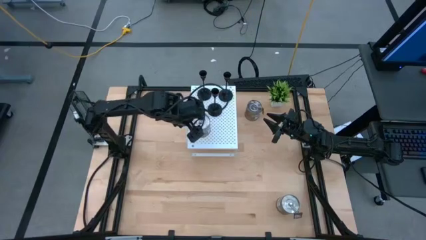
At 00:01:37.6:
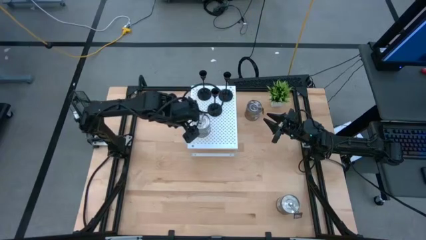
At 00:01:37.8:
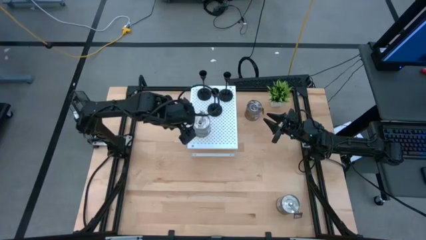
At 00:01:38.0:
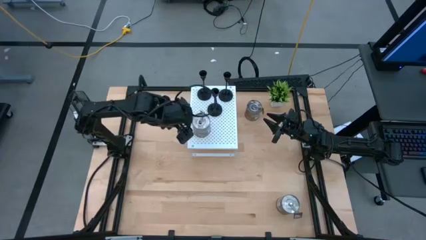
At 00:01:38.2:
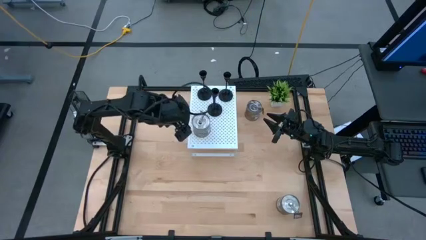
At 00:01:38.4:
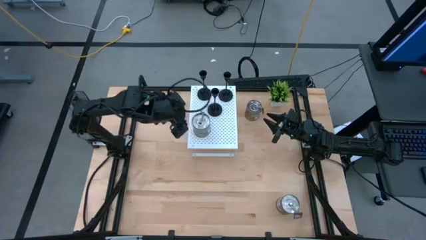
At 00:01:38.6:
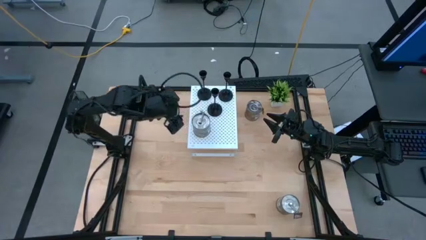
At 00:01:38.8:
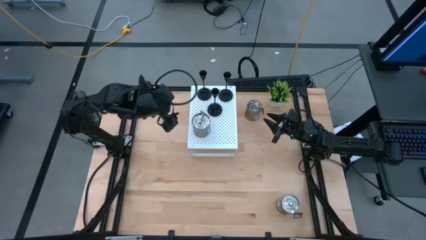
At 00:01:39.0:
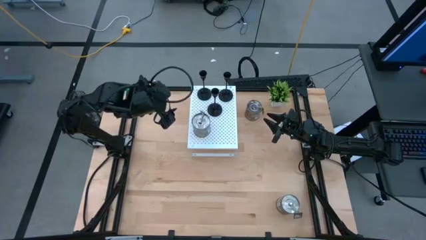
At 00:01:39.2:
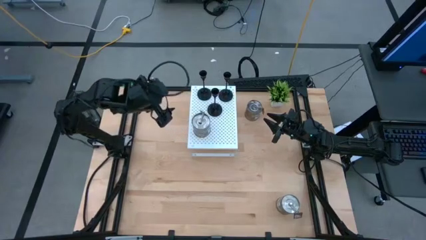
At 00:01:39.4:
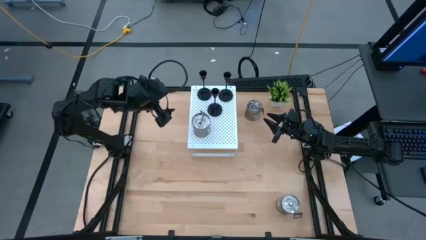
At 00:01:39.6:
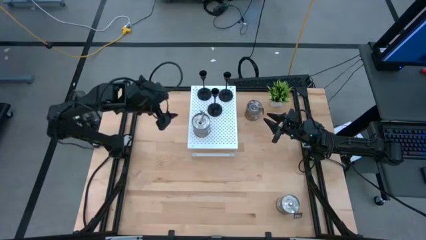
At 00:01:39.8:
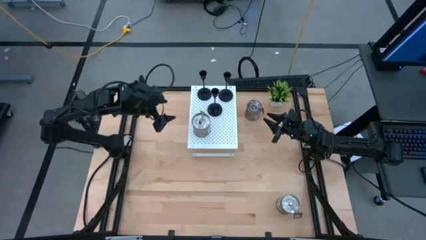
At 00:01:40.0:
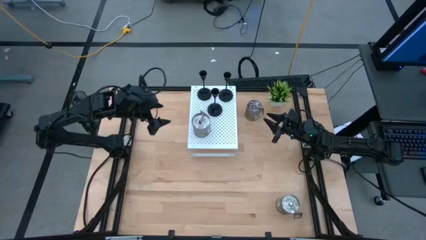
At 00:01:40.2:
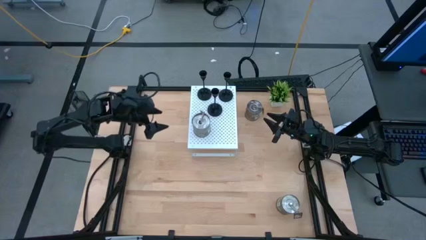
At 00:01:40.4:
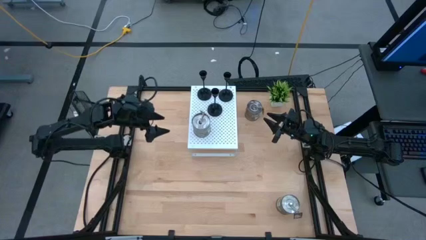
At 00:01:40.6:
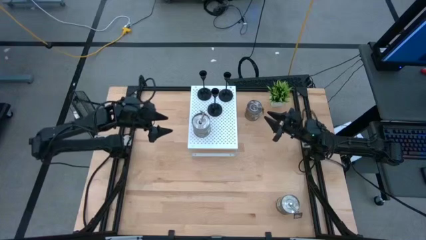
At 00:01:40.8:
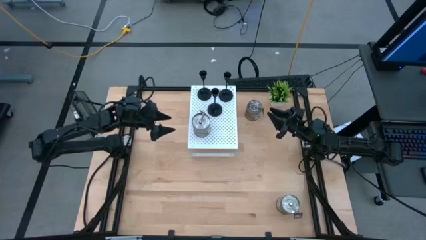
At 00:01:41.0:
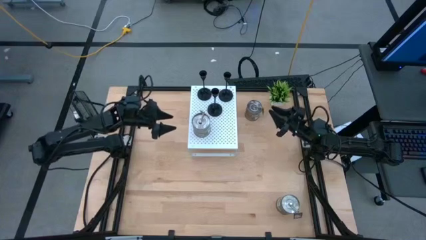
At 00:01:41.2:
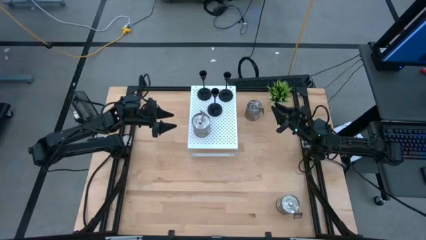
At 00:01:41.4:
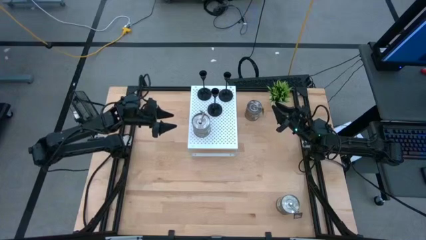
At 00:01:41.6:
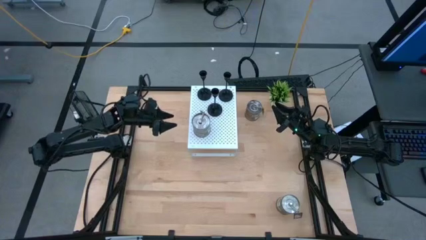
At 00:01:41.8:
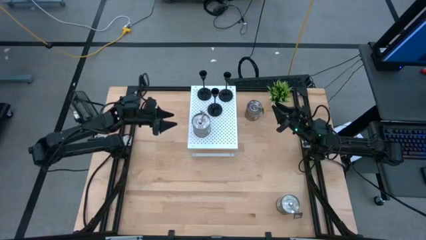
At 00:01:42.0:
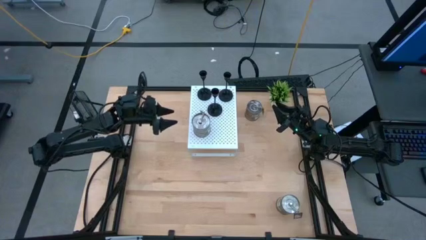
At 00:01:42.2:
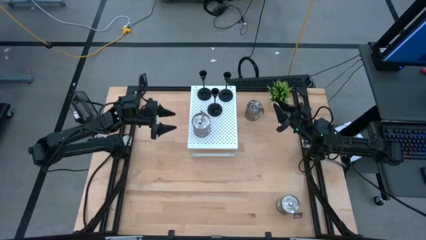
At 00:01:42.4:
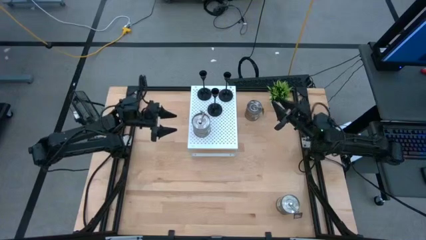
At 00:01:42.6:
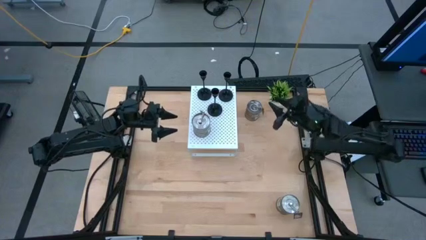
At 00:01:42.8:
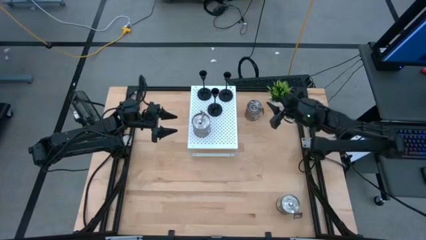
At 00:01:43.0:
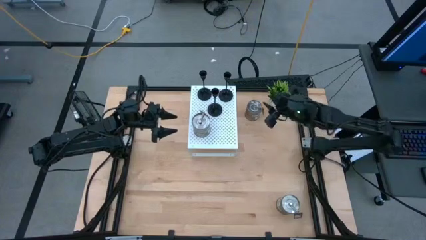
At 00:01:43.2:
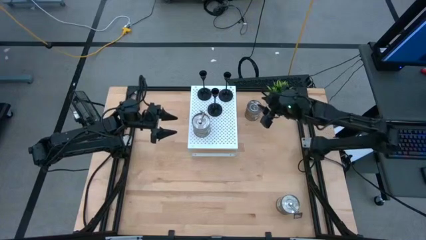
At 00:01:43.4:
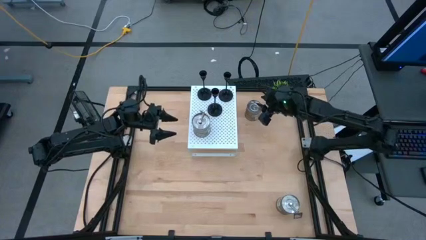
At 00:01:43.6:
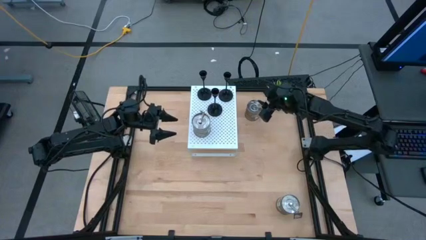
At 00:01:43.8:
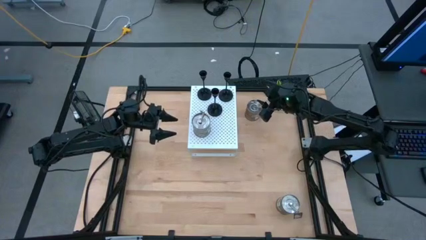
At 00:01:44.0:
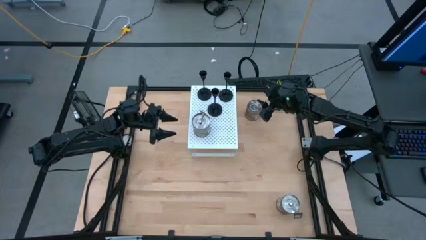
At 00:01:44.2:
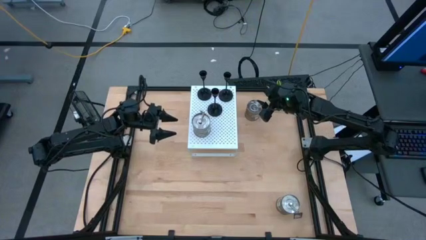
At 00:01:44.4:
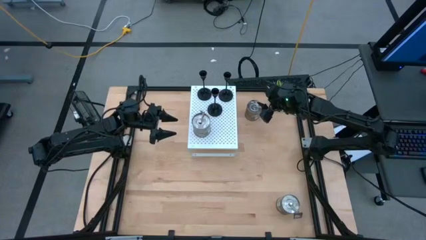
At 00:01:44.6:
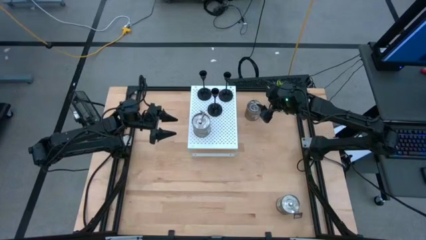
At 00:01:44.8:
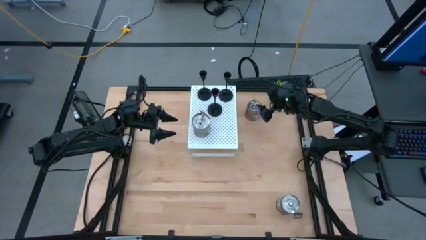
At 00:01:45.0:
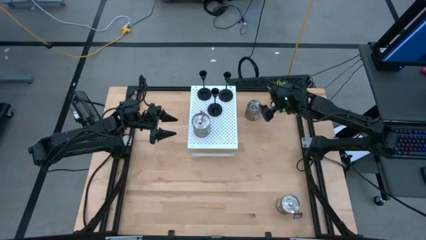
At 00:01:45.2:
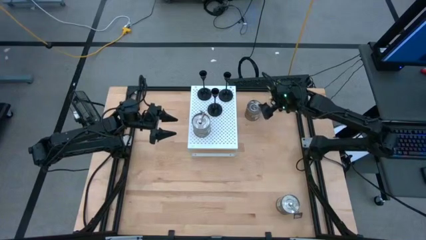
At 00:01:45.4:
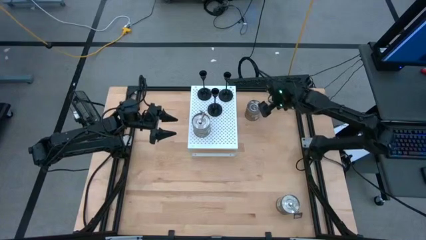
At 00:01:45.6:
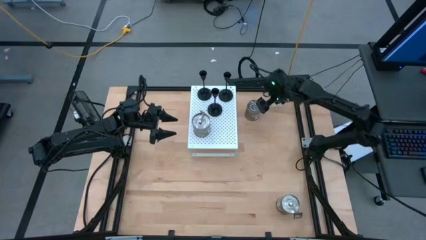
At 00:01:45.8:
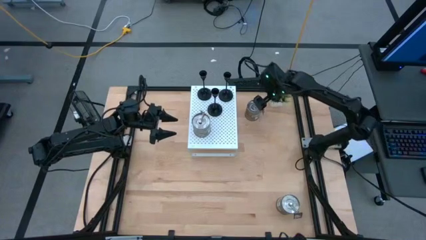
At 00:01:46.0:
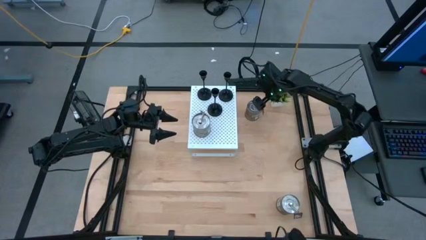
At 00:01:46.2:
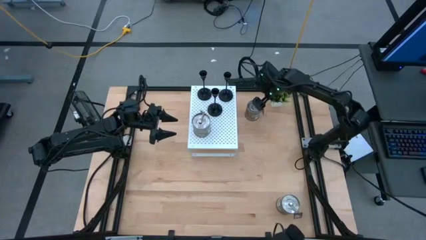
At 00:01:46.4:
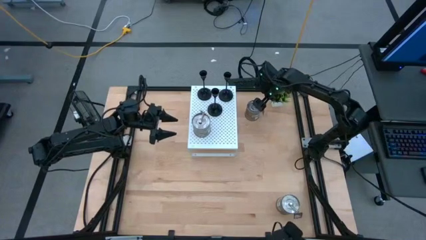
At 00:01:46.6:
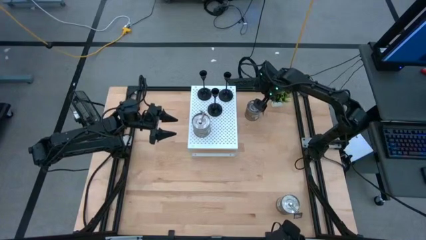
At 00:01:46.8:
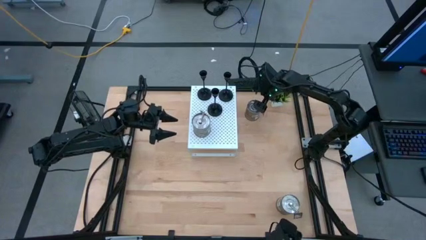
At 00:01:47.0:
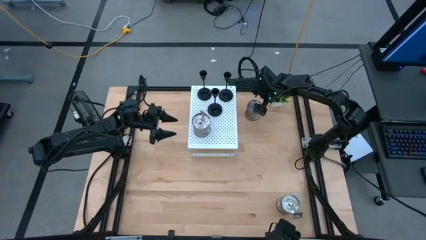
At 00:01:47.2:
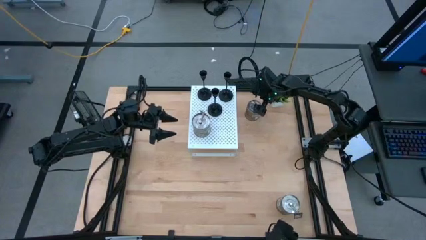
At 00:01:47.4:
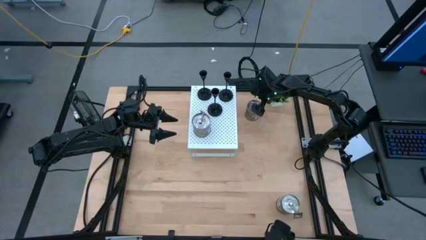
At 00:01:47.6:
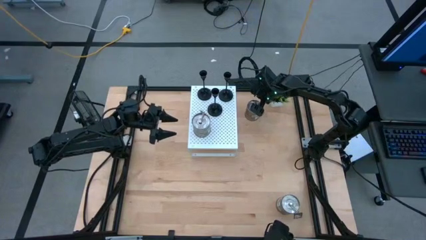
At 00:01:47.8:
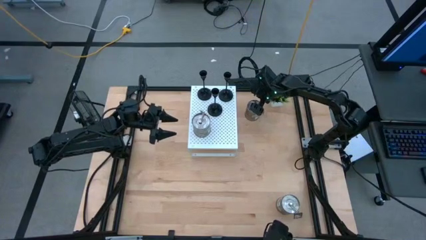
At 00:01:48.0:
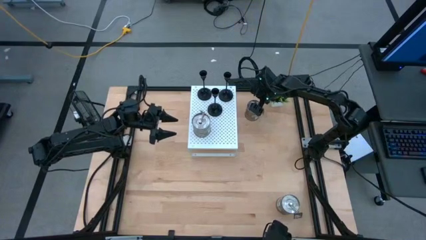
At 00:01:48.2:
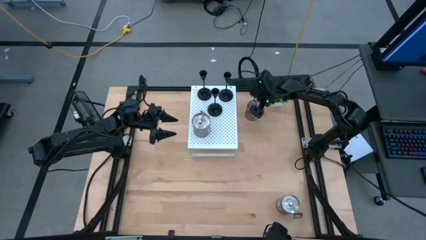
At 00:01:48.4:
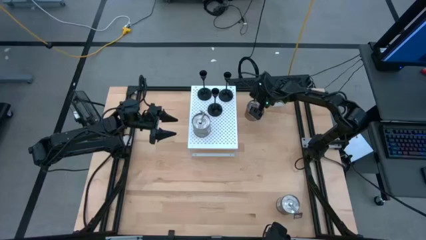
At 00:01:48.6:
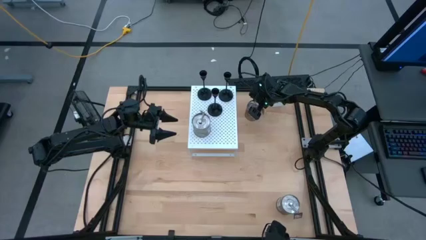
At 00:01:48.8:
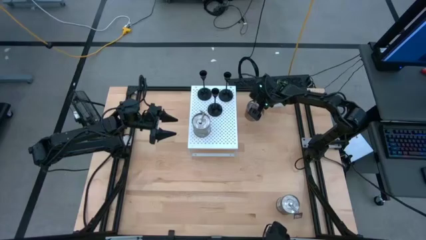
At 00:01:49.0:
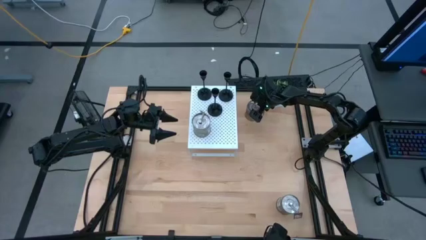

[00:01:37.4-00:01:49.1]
Task: Pick & Place candle stick holders
Put the top brown scented candle on the shelf
